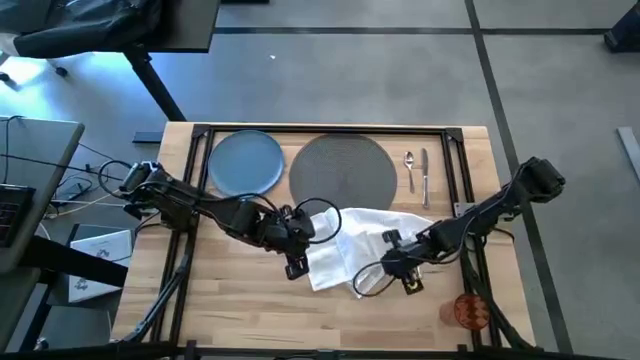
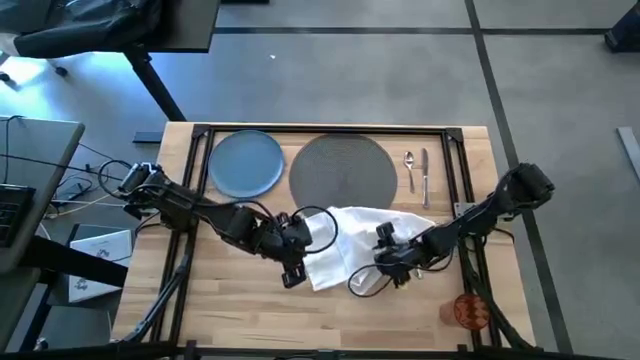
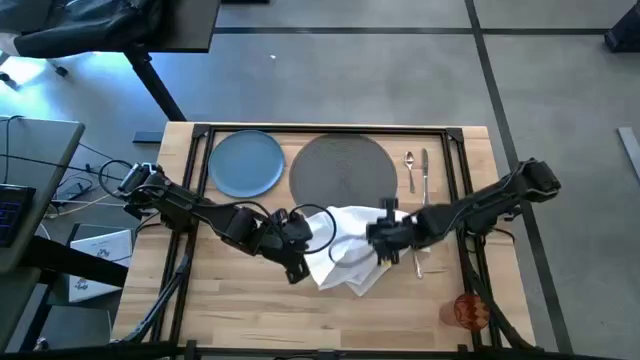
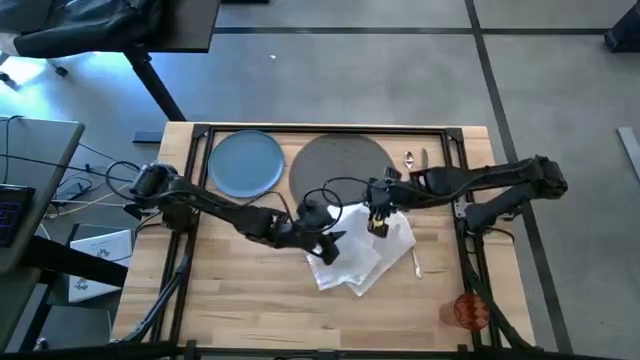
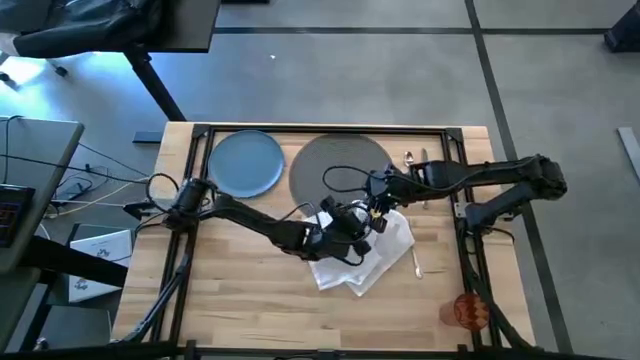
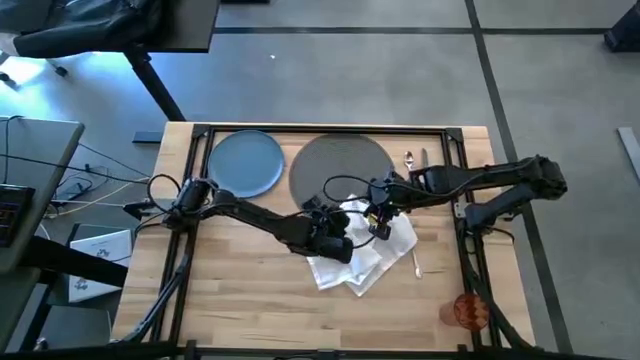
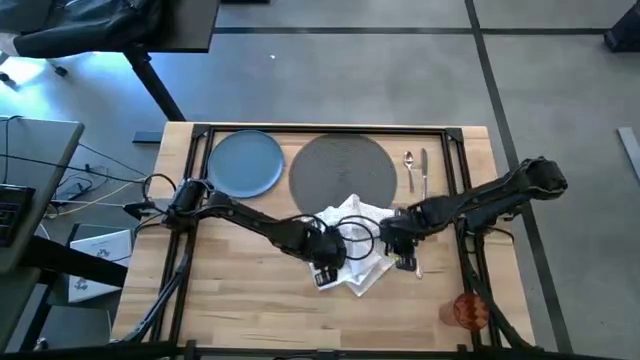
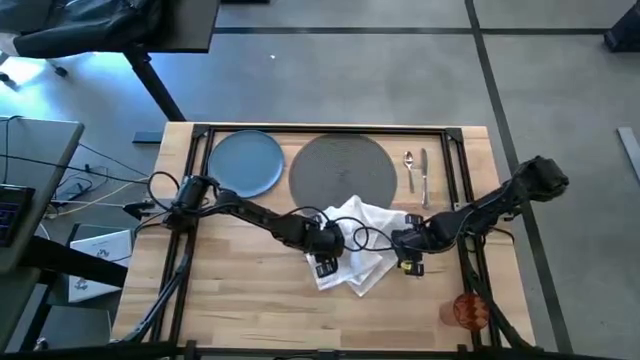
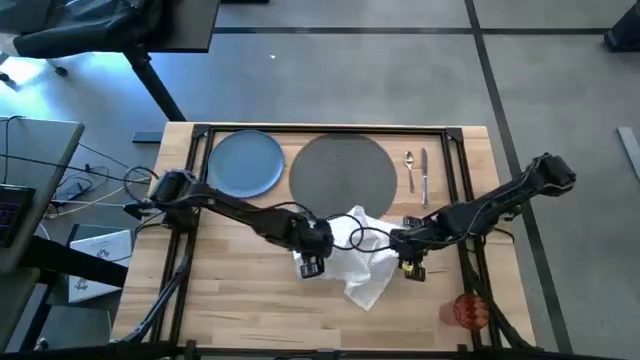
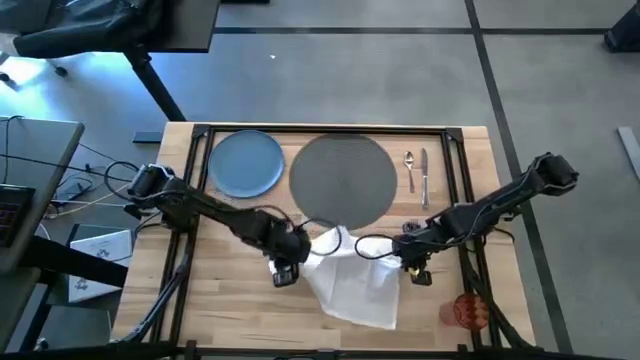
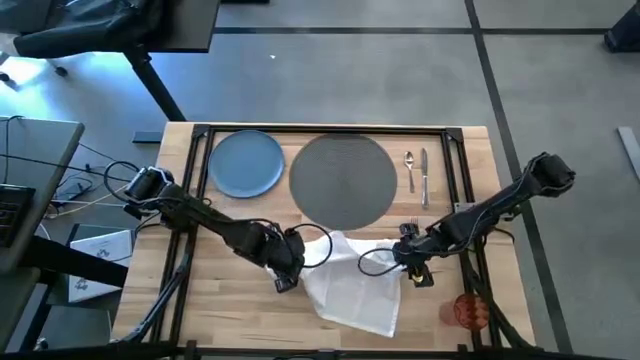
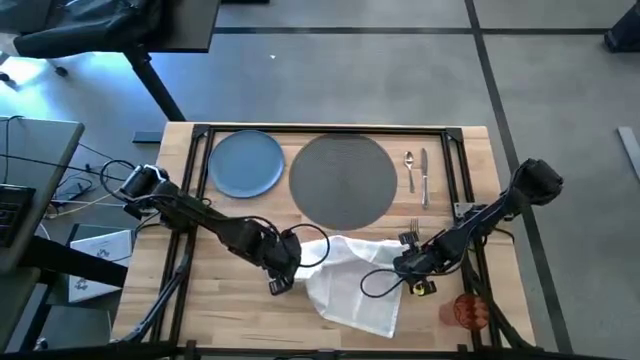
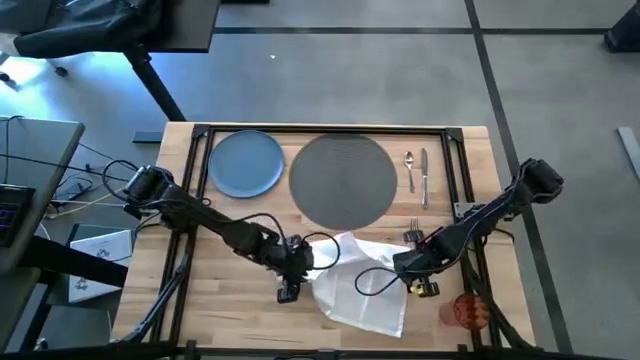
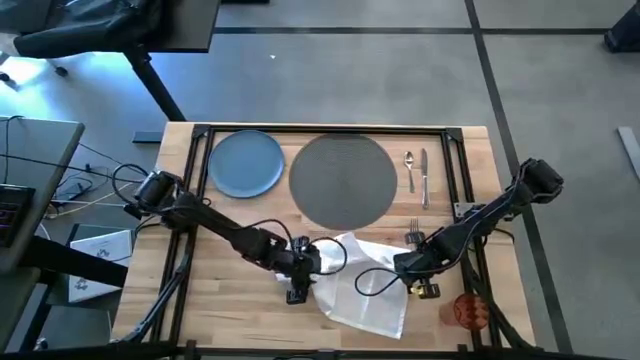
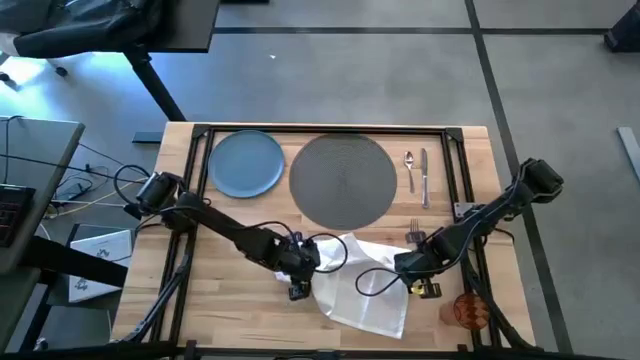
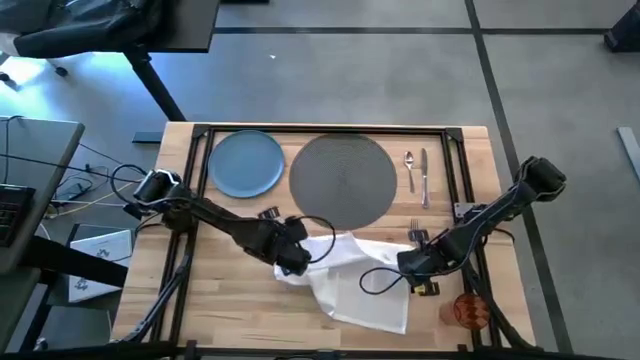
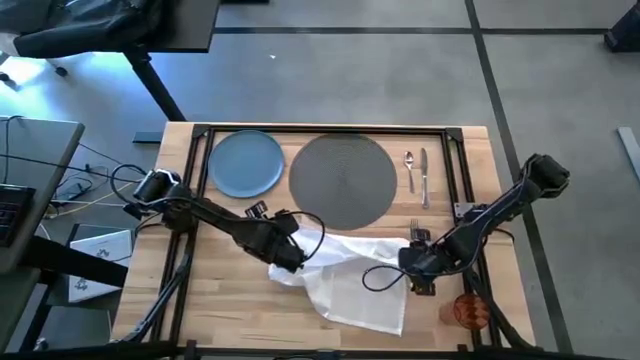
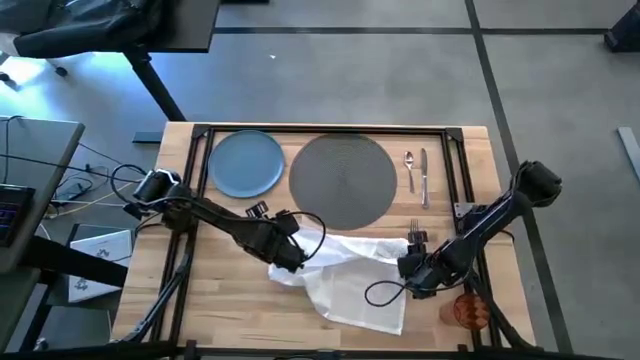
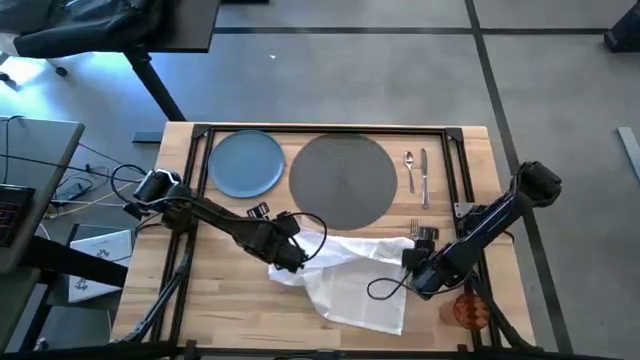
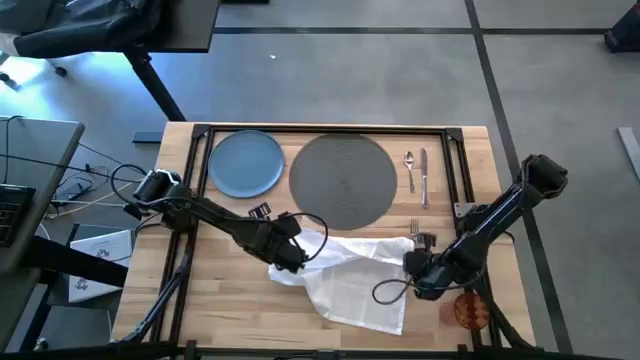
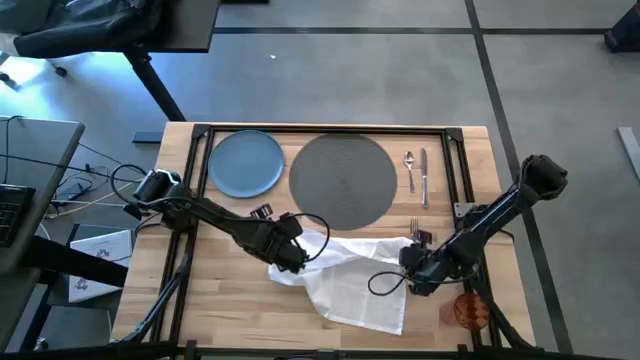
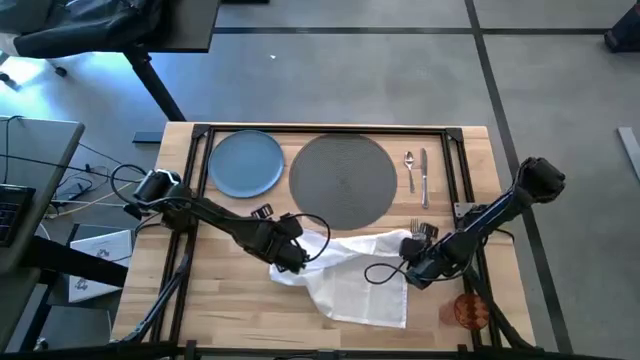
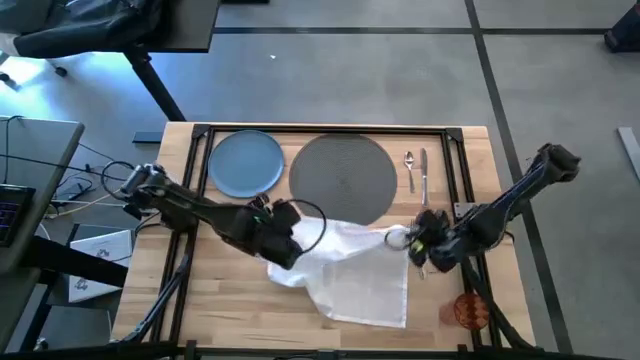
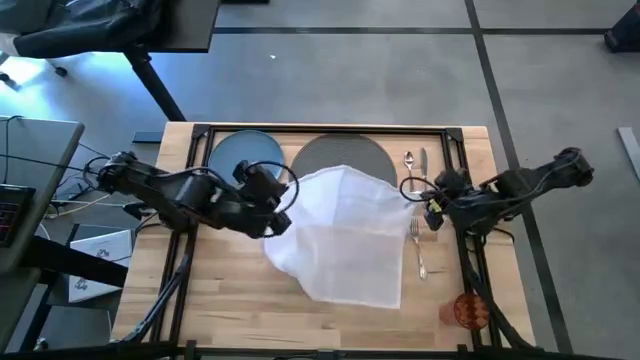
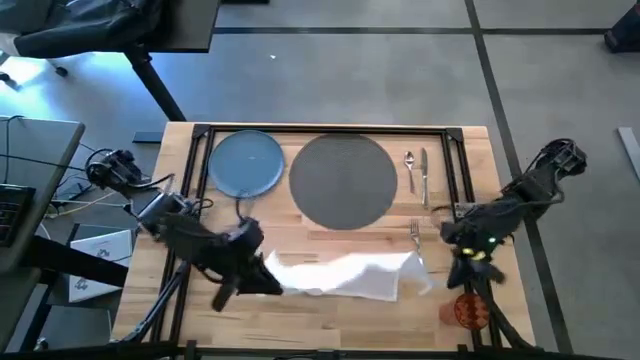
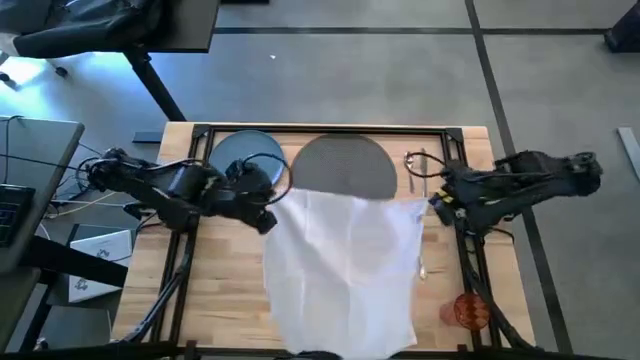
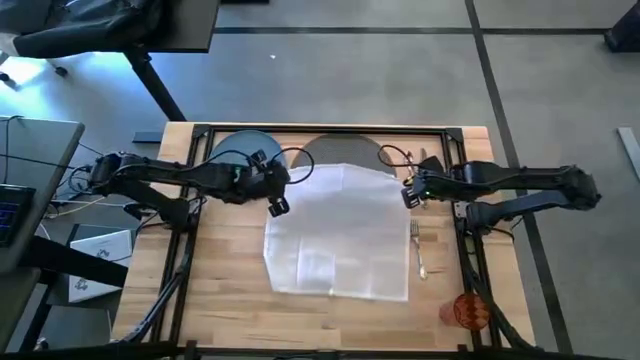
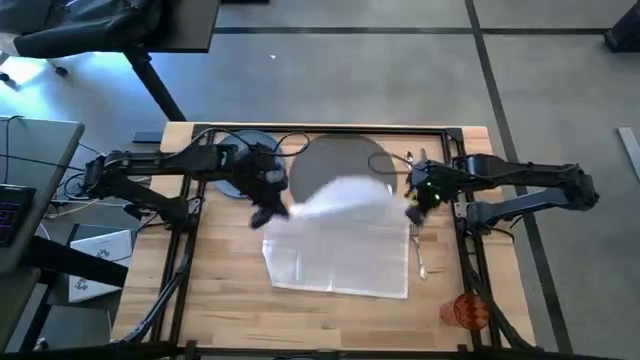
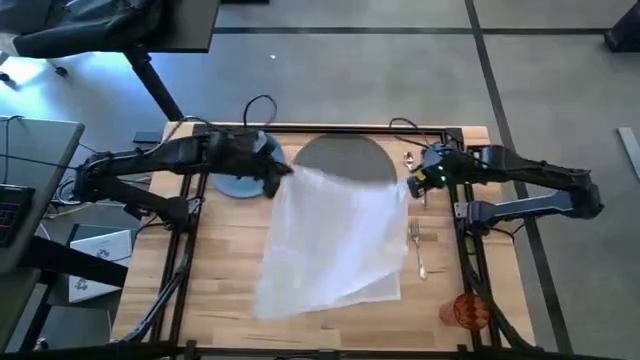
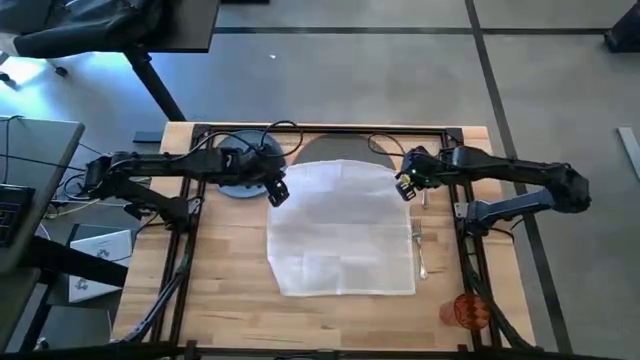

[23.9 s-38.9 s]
Task: Set table place
Fold the white table napkin

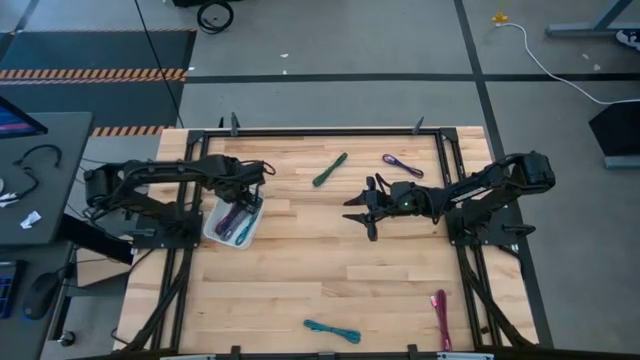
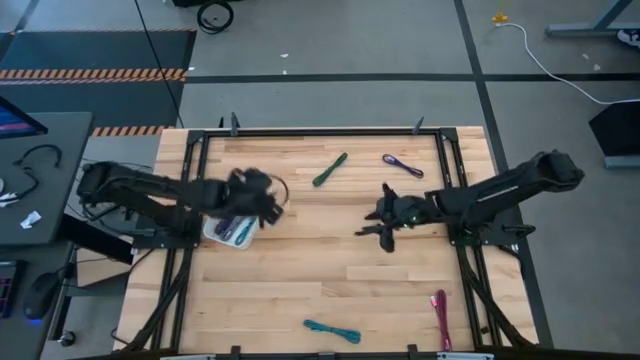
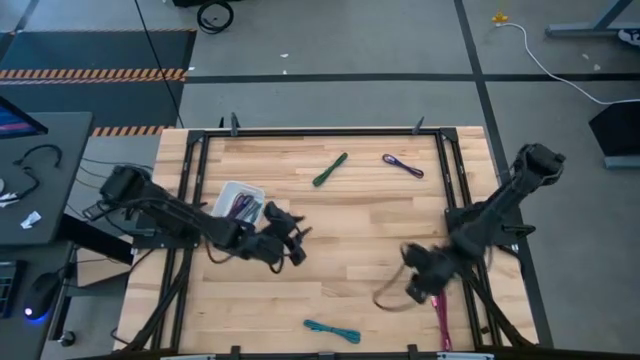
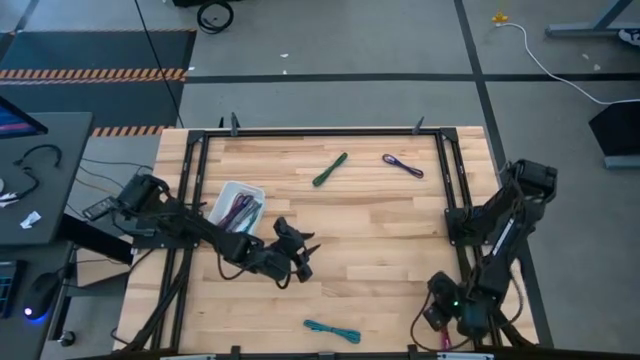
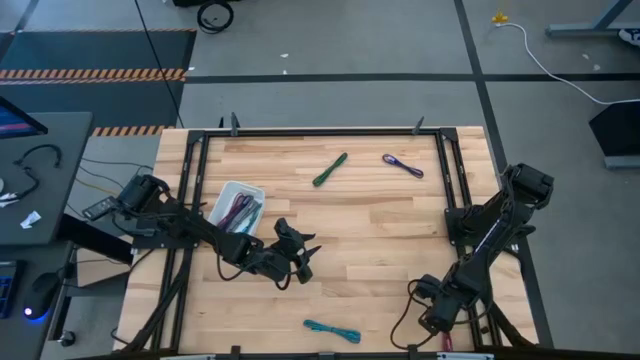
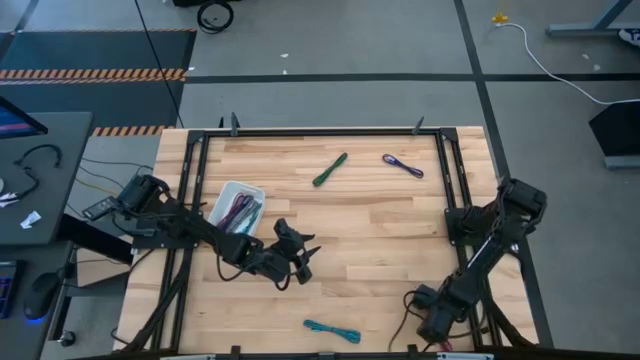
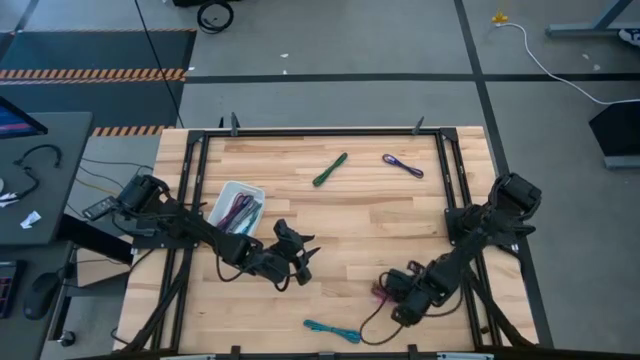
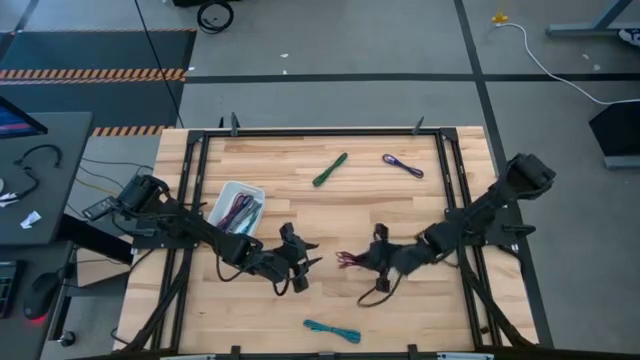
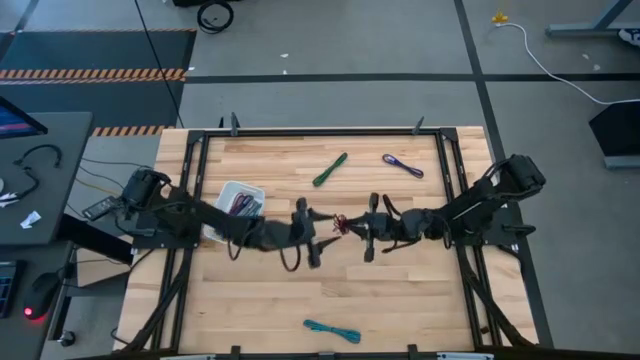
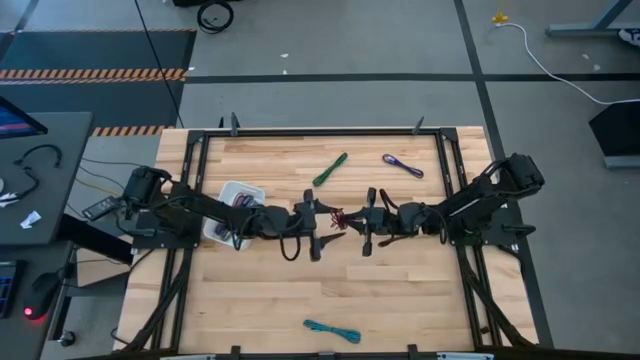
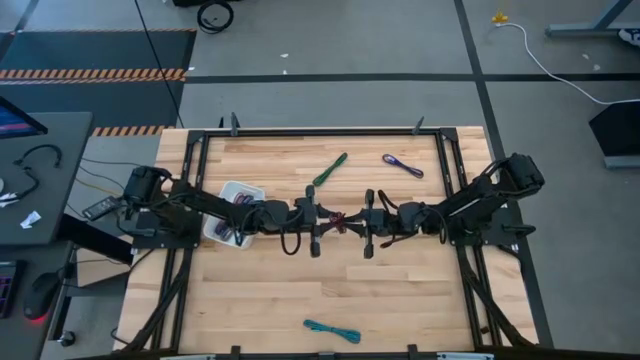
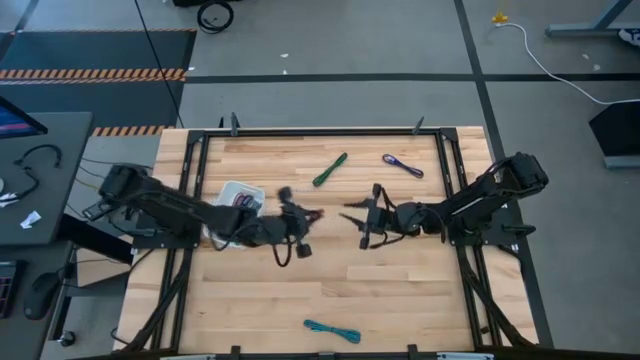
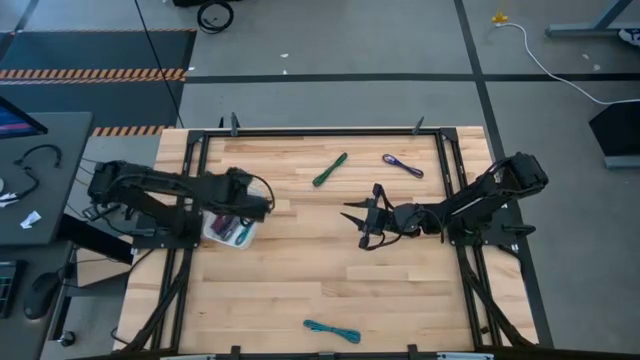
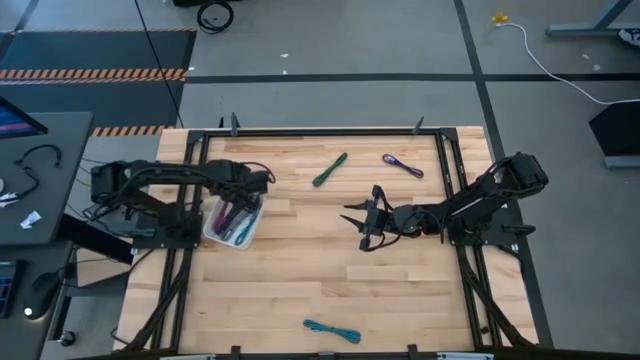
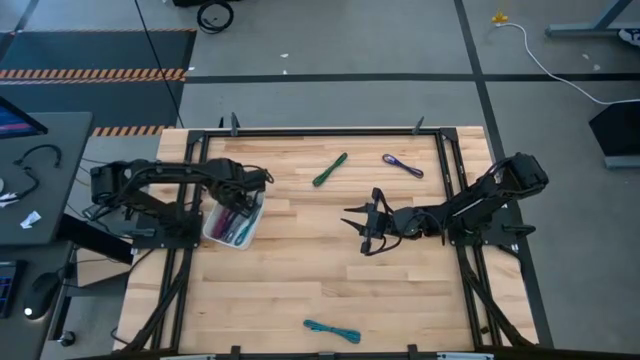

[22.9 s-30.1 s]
Task: Pick and place USB-C Cables
Put the pink charger cable into the white bin
